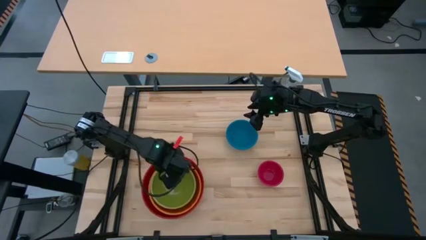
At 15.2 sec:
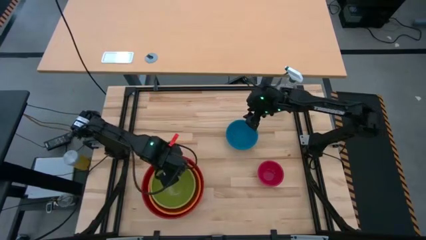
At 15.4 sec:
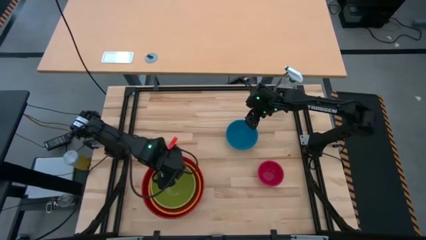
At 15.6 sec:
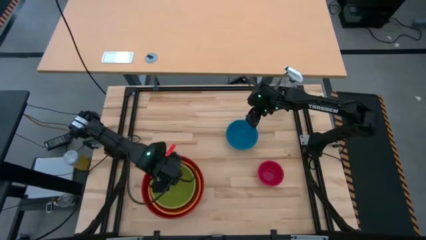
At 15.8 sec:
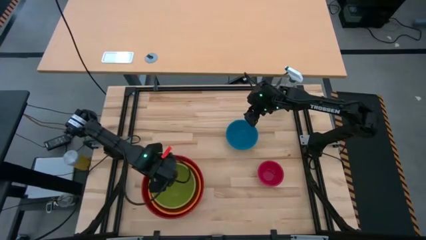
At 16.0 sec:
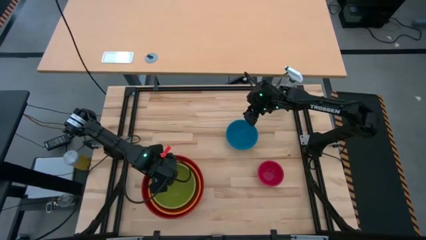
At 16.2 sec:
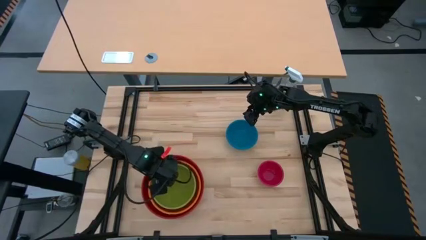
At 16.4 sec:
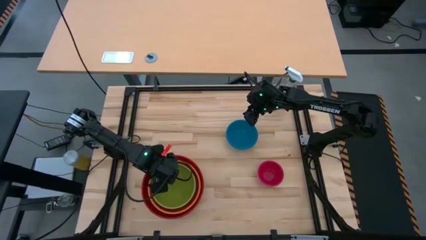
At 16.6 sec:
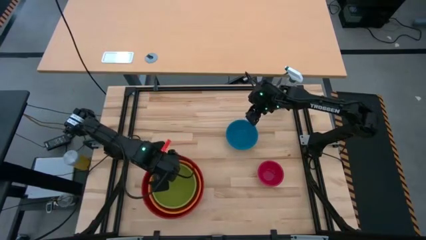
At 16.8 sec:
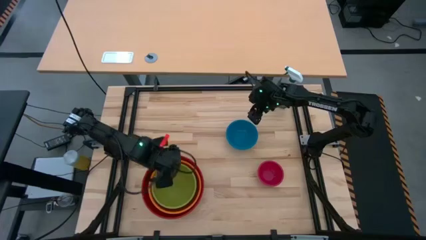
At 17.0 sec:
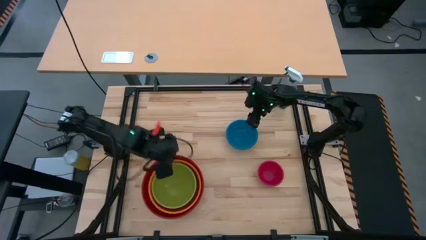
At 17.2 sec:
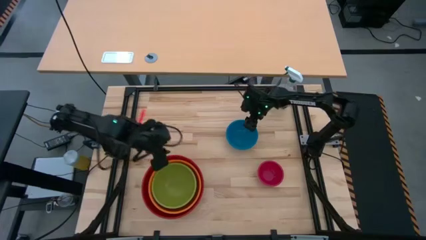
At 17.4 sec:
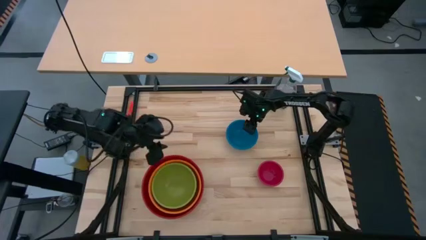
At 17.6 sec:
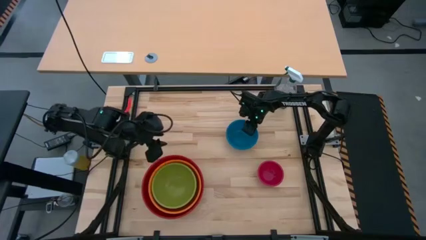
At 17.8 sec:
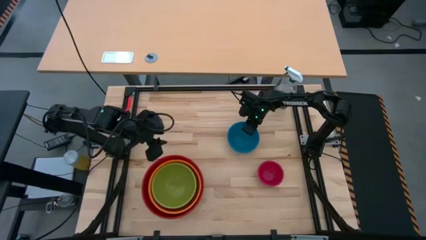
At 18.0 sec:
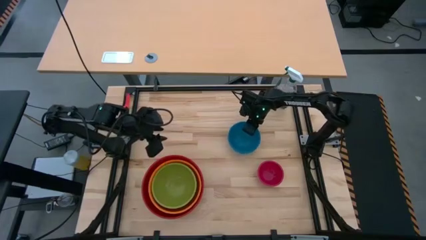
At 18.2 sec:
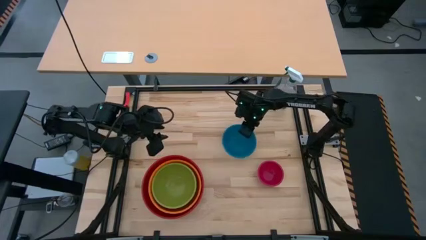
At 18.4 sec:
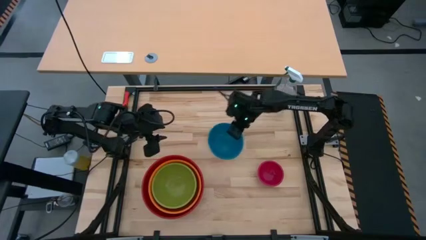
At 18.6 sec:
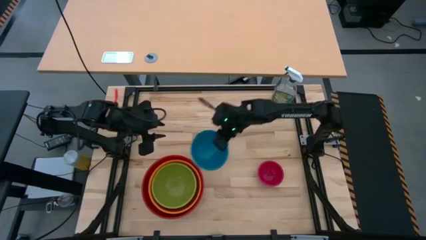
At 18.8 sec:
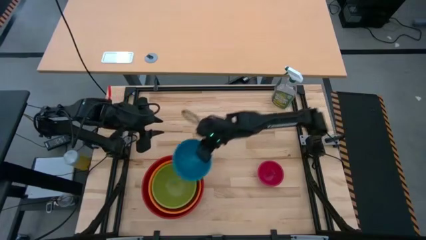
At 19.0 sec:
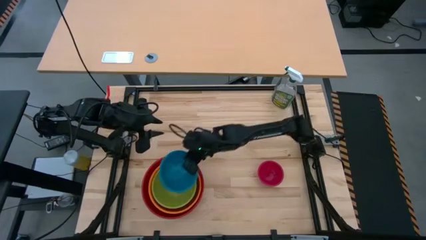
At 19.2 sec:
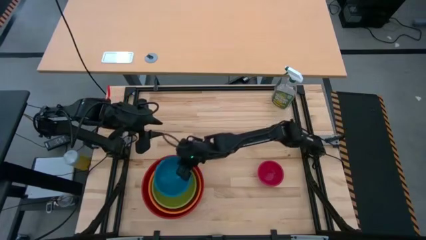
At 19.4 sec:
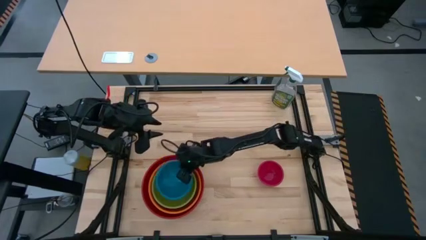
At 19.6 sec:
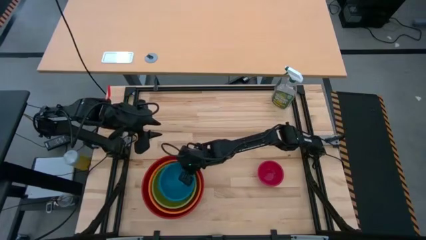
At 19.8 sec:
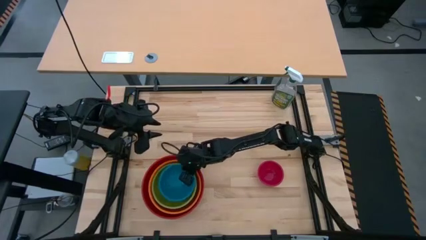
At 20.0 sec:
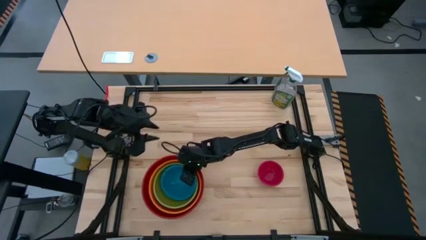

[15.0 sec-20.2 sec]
Stack the blue bowl on top of the green bowl

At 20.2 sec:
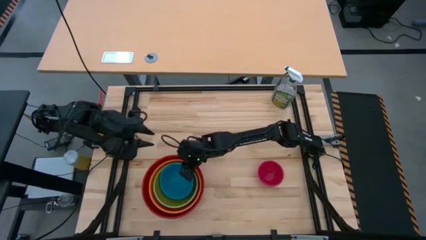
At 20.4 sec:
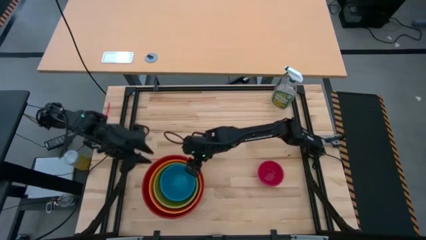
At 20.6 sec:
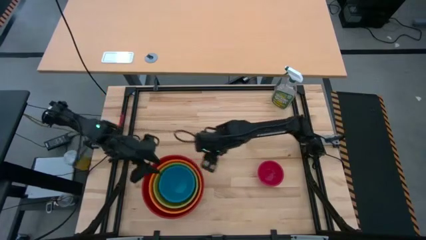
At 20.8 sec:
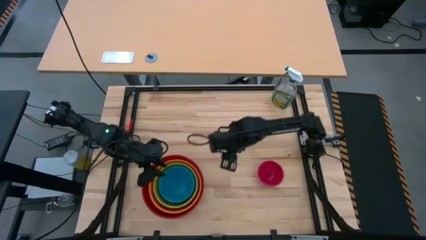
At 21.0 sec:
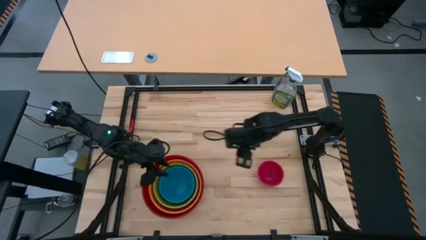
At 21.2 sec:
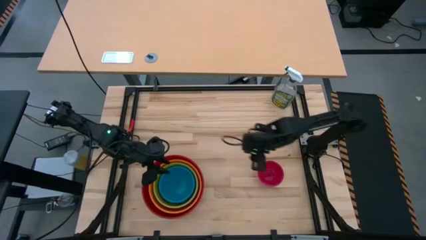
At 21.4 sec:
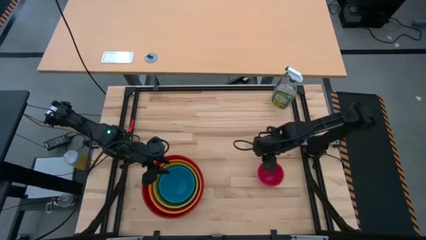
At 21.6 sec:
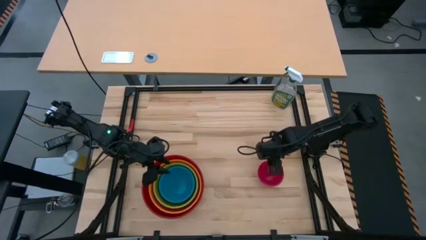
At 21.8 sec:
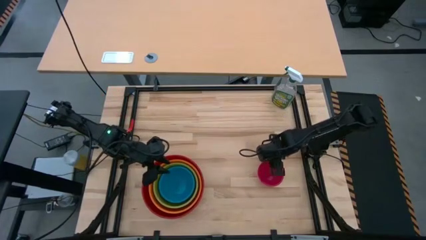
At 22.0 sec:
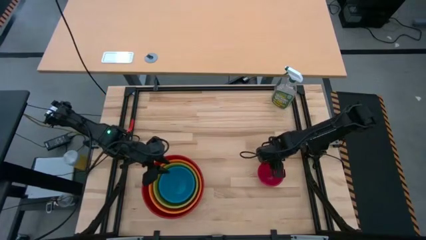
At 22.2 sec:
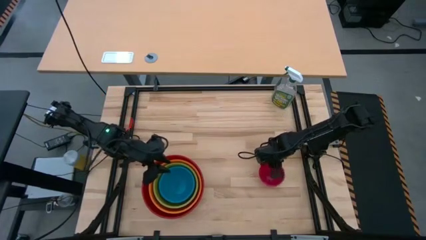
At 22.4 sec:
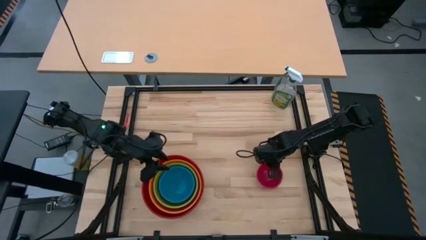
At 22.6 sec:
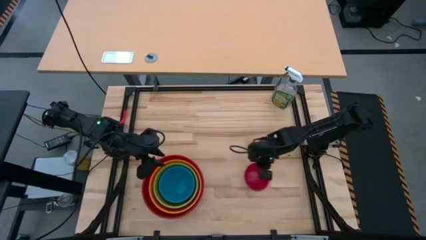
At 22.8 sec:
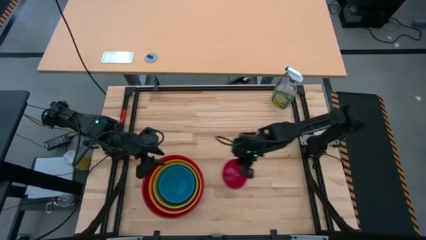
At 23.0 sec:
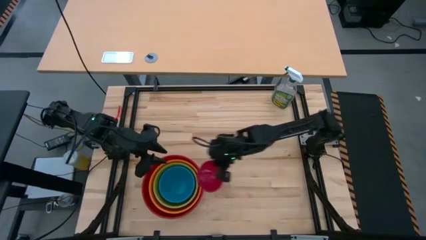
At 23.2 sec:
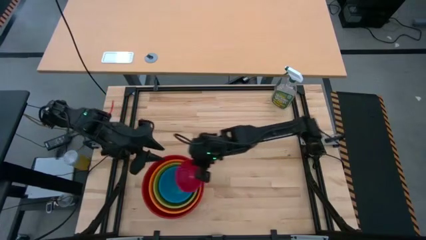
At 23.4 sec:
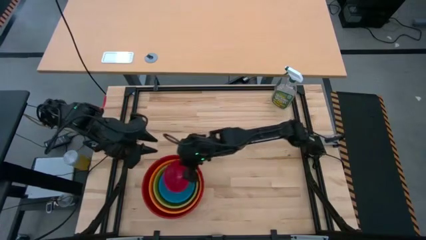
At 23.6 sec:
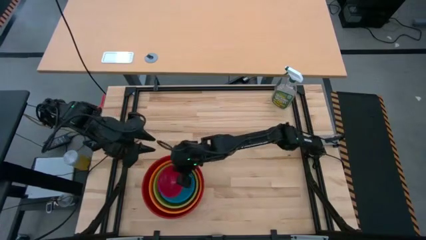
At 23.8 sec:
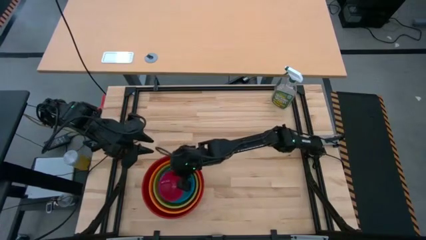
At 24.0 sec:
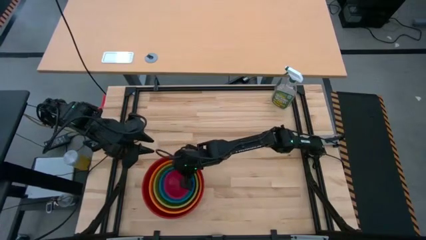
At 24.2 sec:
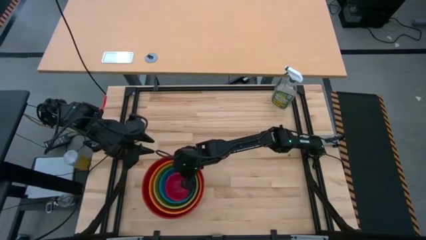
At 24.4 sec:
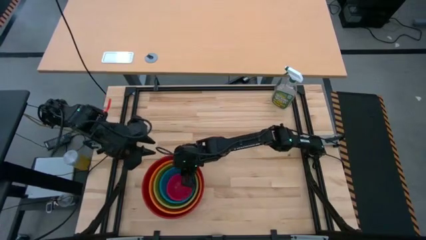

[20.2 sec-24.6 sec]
Stack the red bowl on top of the blue bowl

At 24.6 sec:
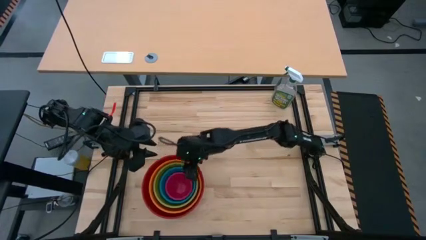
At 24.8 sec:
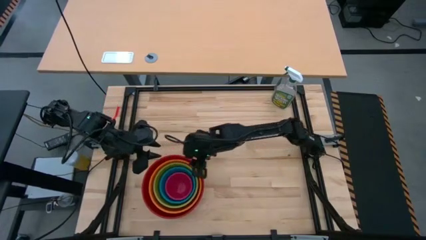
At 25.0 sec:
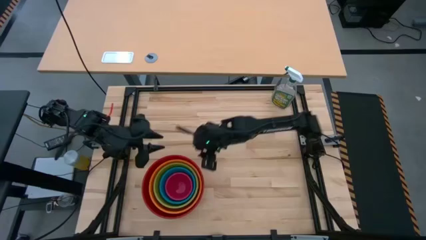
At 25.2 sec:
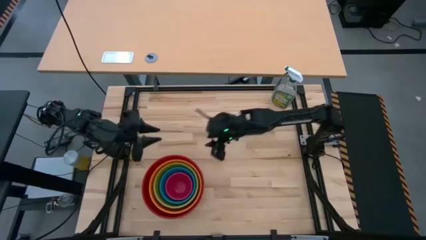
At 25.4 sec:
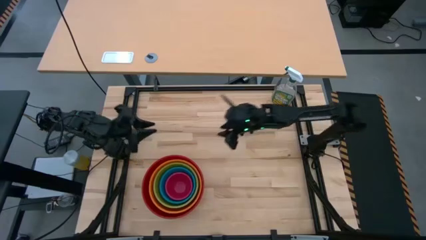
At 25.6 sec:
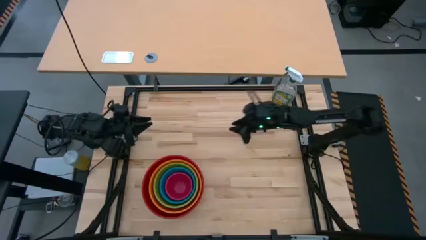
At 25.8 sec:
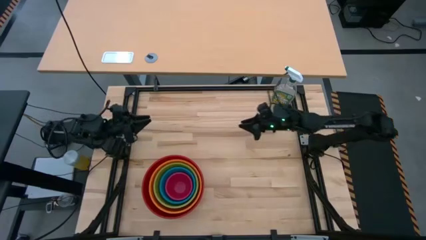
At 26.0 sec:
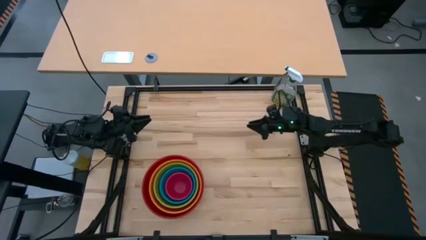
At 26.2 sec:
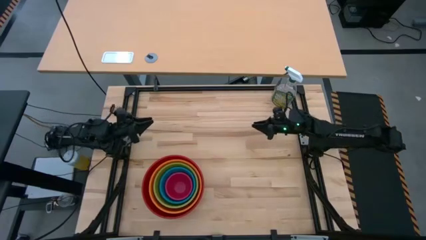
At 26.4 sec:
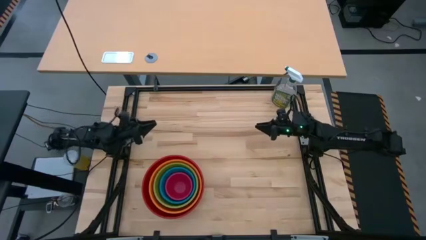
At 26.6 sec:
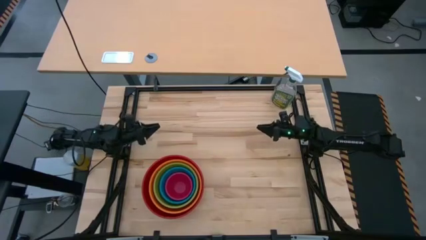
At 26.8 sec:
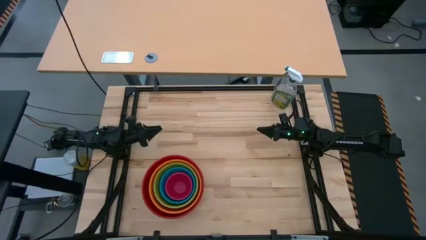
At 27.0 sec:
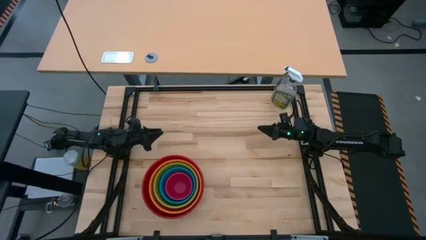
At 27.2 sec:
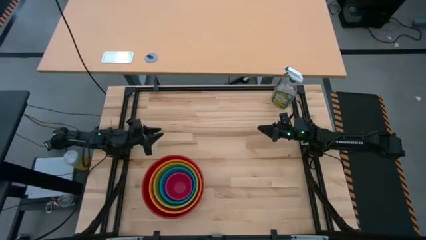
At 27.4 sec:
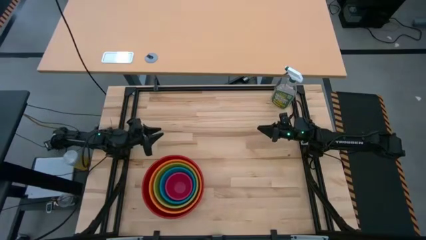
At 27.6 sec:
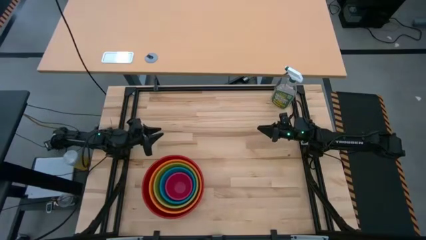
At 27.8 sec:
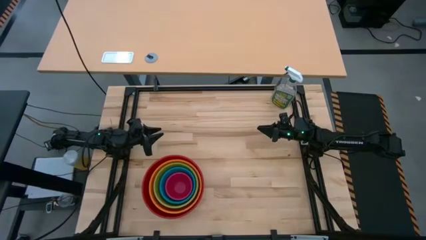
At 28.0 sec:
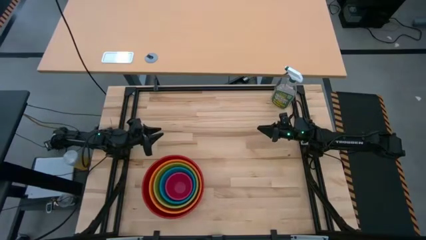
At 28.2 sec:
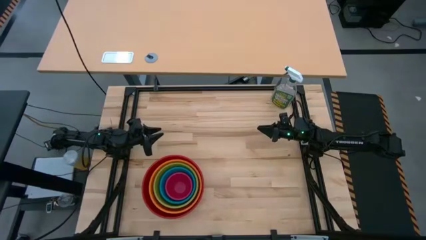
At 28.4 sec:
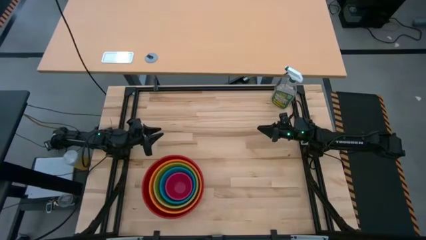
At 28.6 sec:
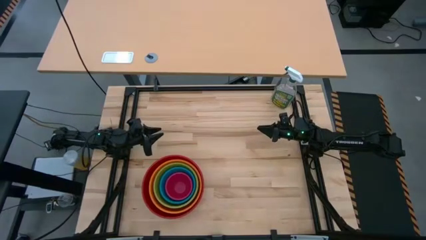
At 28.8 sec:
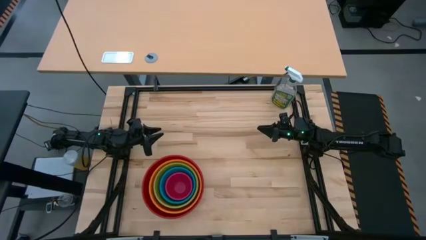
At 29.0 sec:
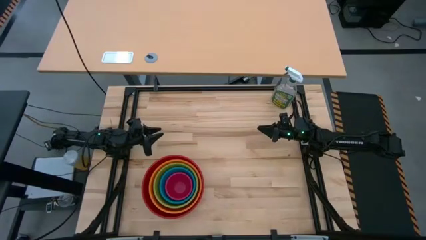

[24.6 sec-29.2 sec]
Return to Home Position
